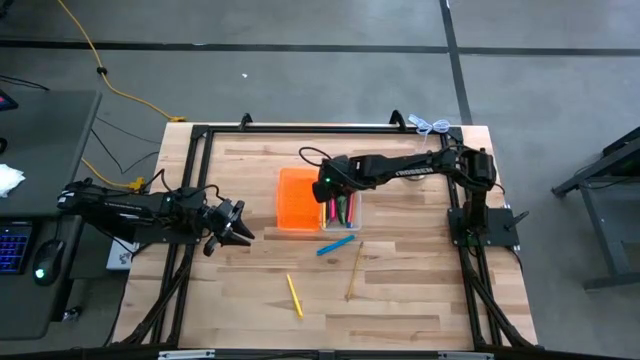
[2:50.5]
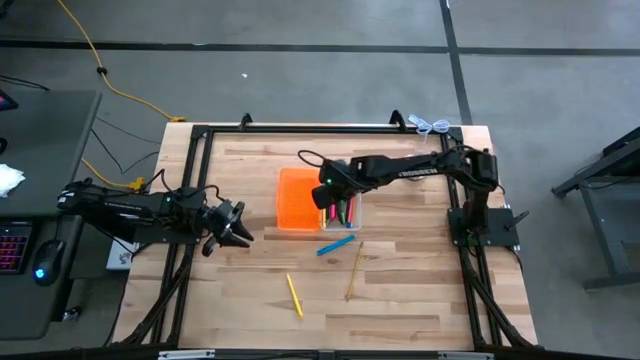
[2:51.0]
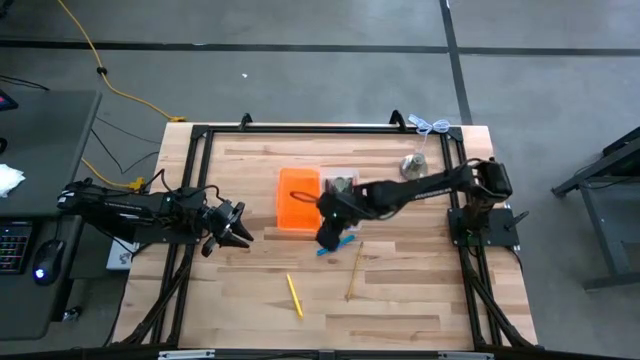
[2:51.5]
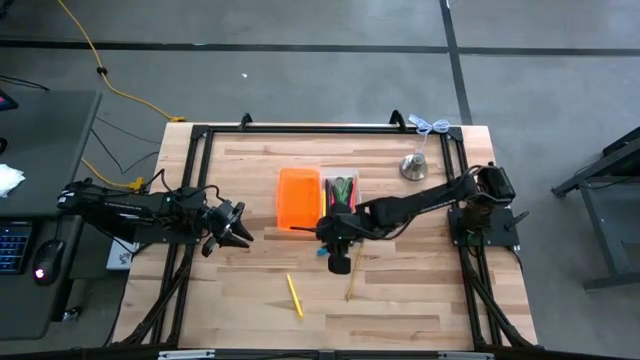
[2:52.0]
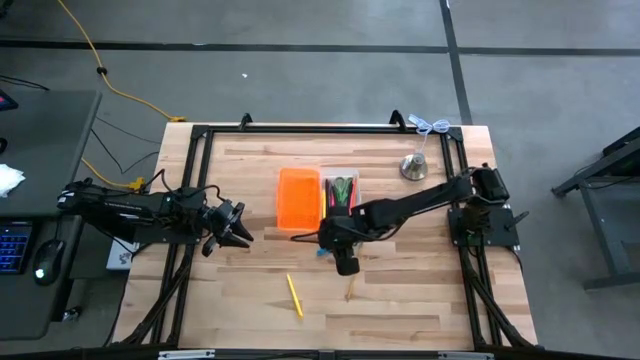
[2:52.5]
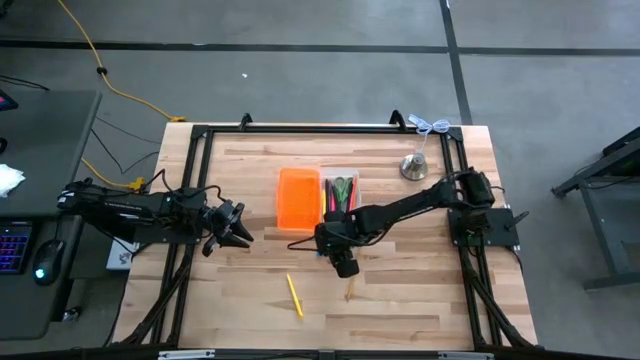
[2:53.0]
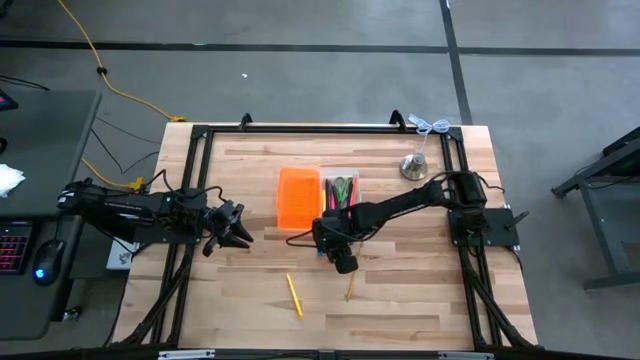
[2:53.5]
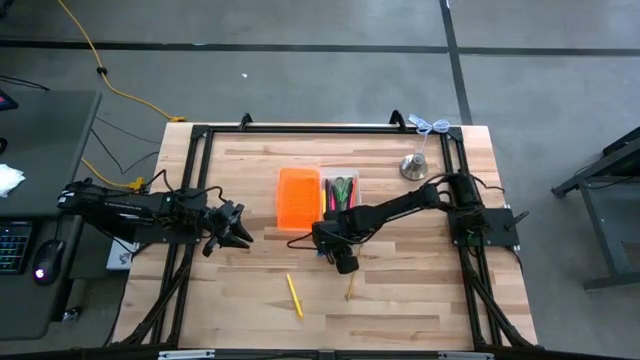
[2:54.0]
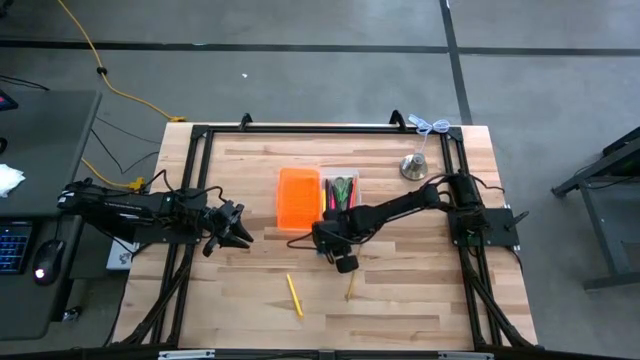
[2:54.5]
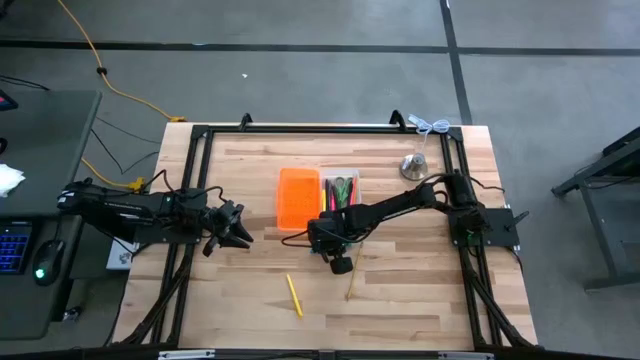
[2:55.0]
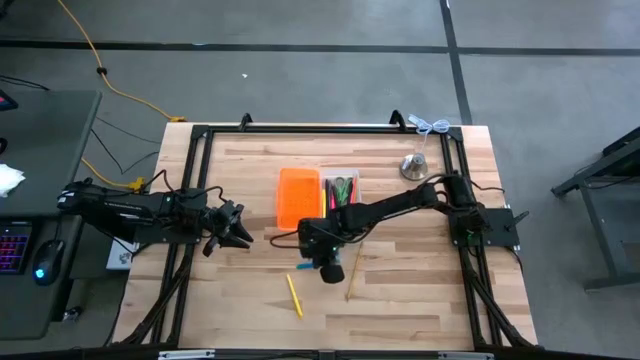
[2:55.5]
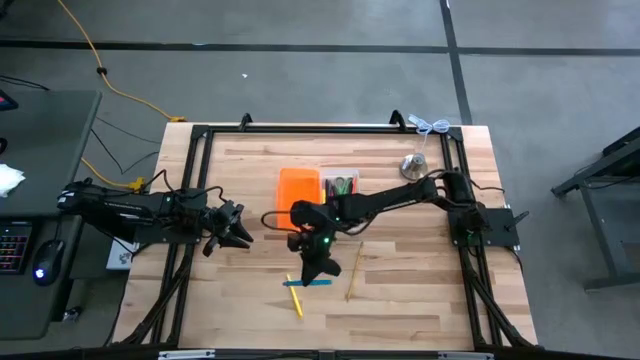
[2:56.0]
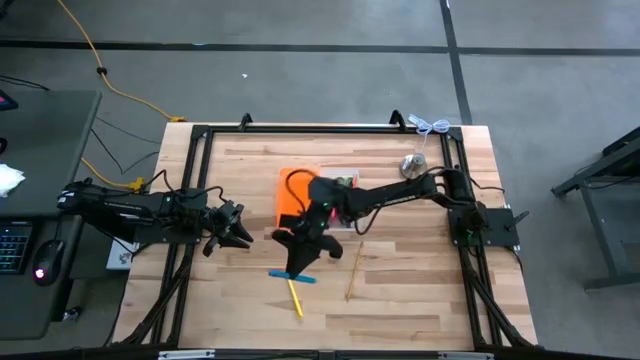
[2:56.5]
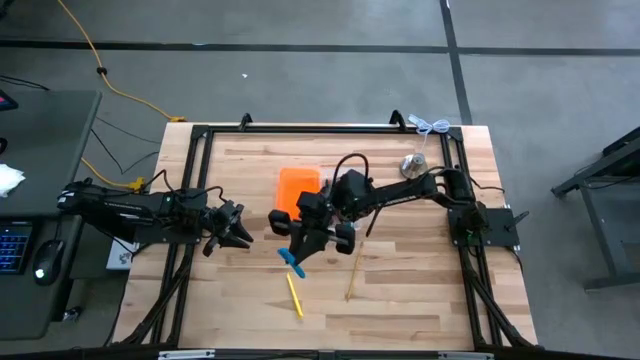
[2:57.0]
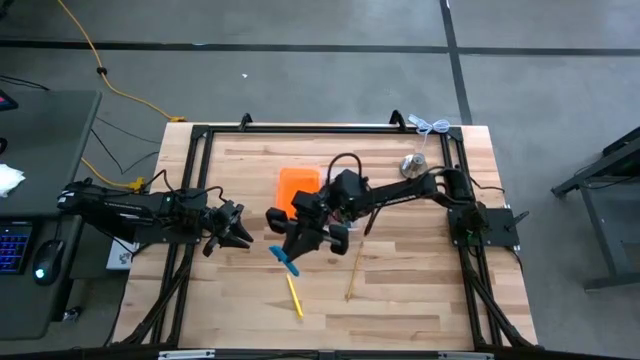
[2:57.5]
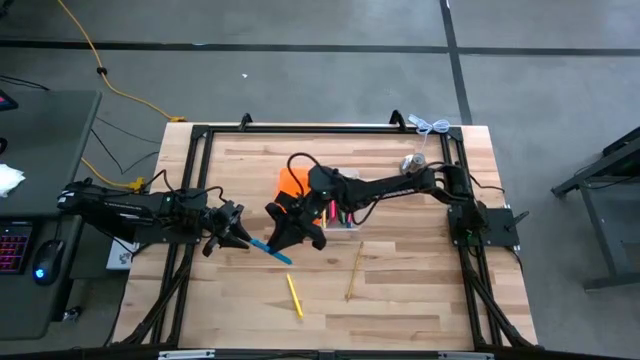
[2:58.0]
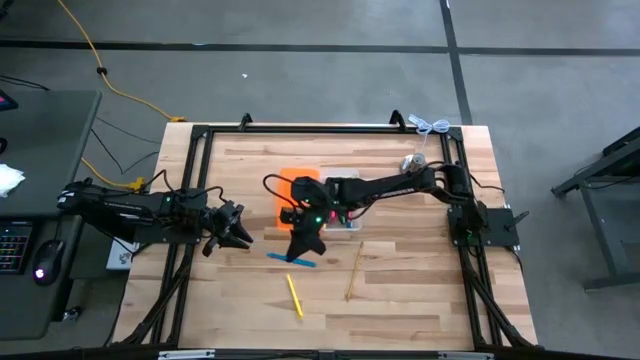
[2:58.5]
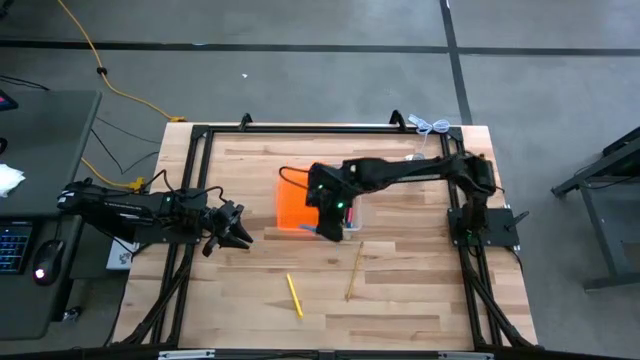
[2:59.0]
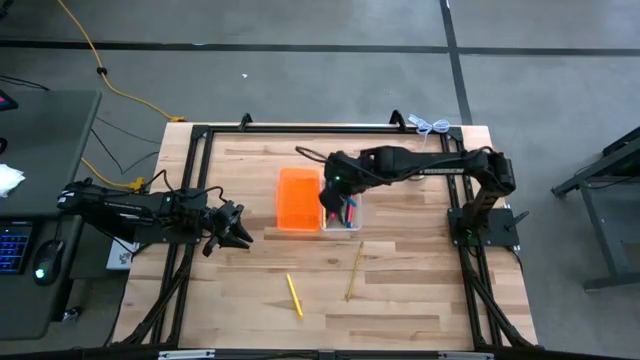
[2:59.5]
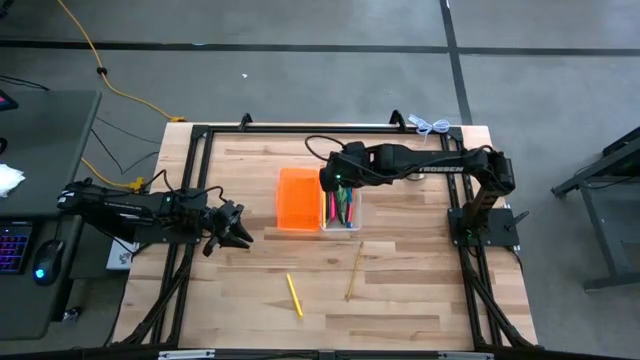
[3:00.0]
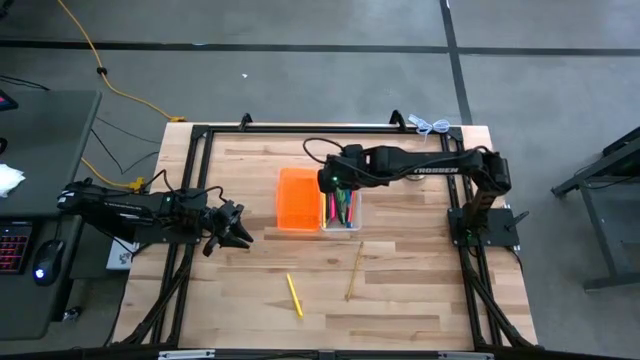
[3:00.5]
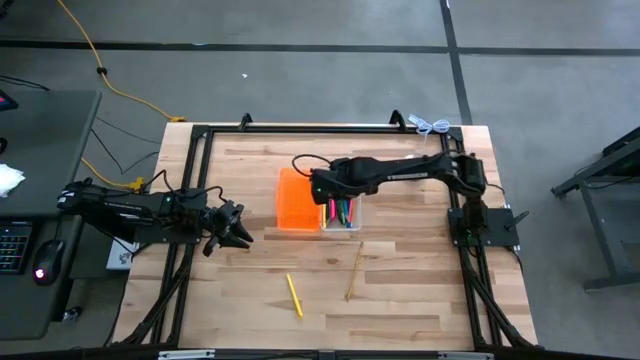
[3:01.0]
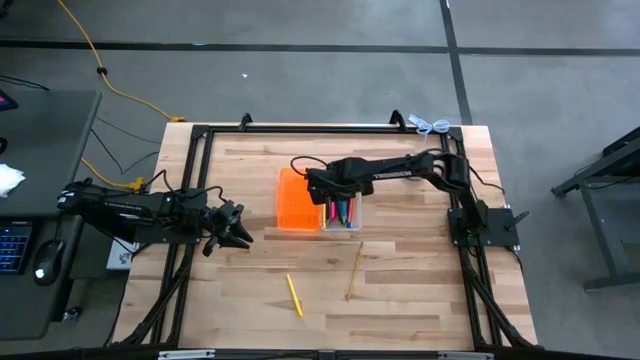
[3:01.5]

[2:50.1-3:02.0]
Task: Pick & place school supplies into a supply box
Put the blue pen into the supply box

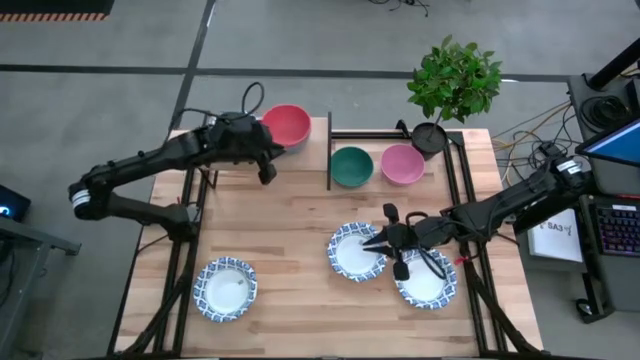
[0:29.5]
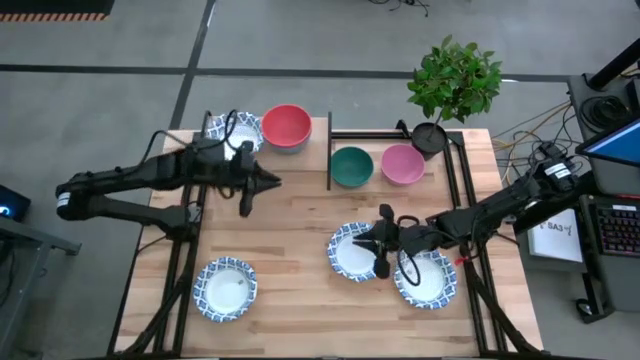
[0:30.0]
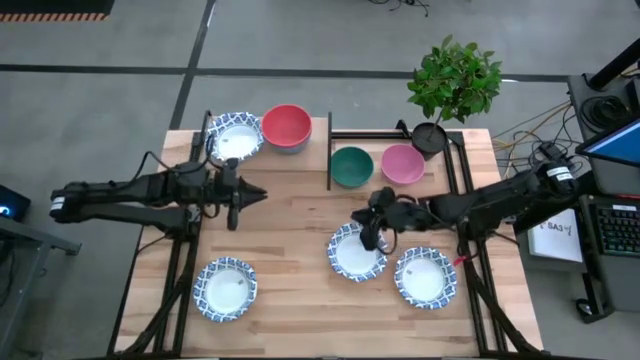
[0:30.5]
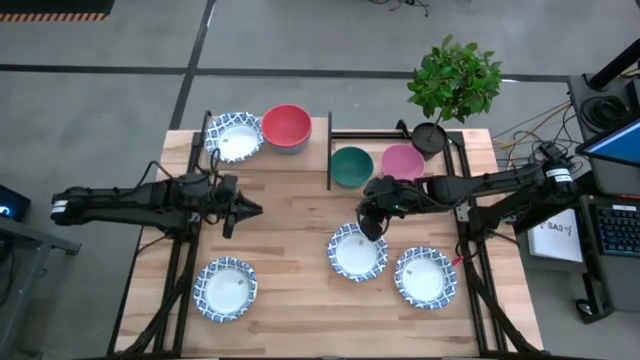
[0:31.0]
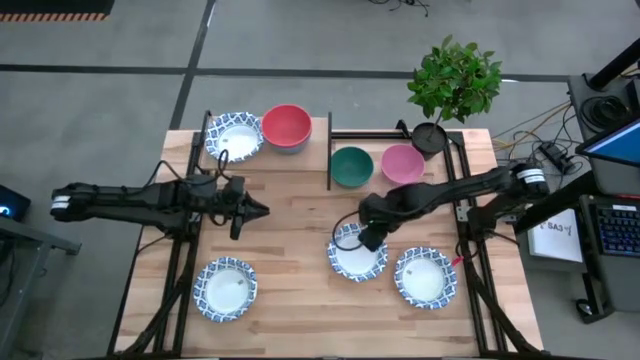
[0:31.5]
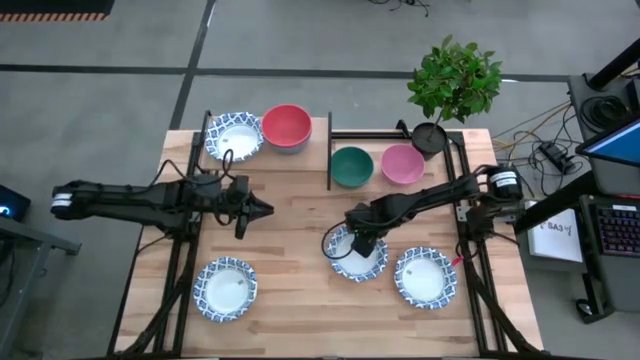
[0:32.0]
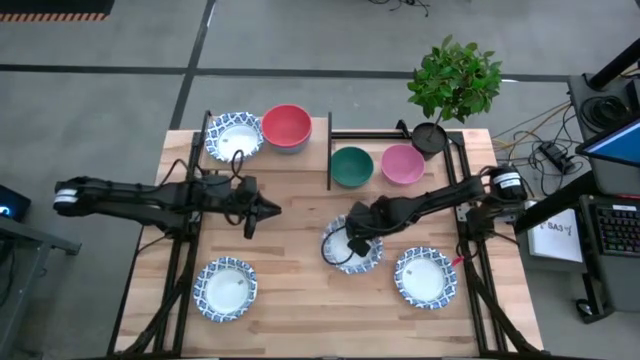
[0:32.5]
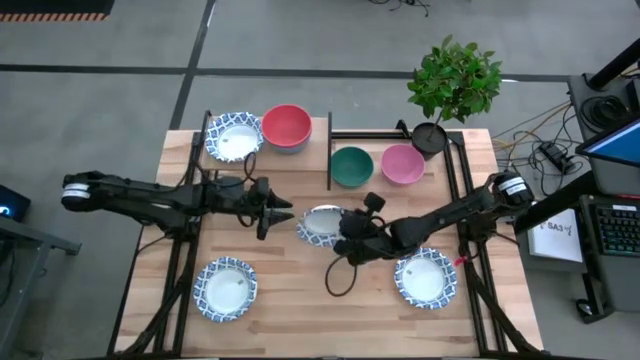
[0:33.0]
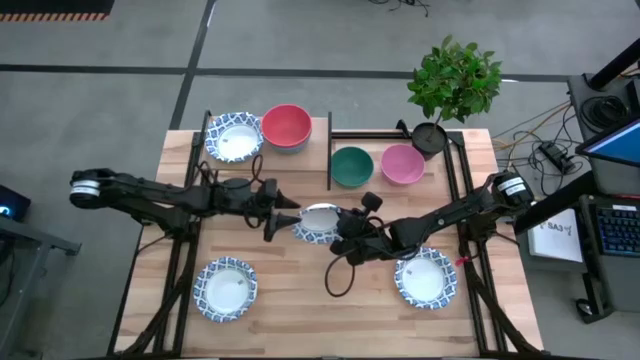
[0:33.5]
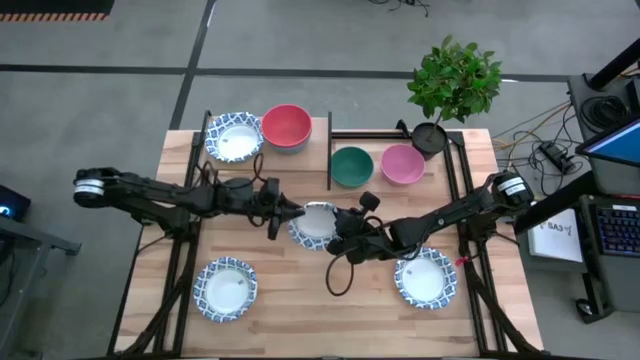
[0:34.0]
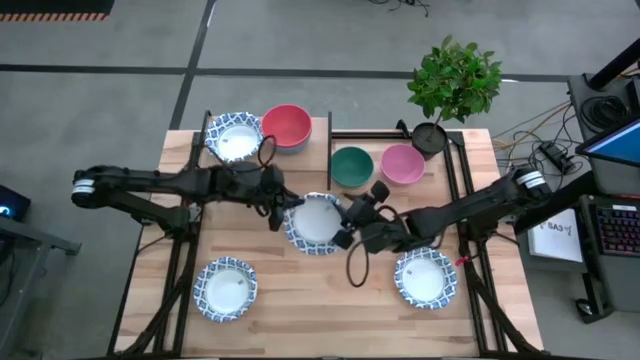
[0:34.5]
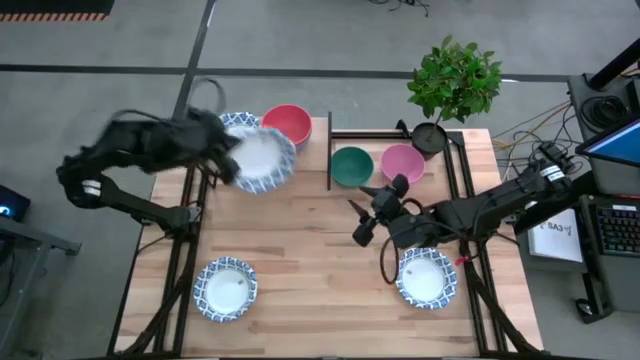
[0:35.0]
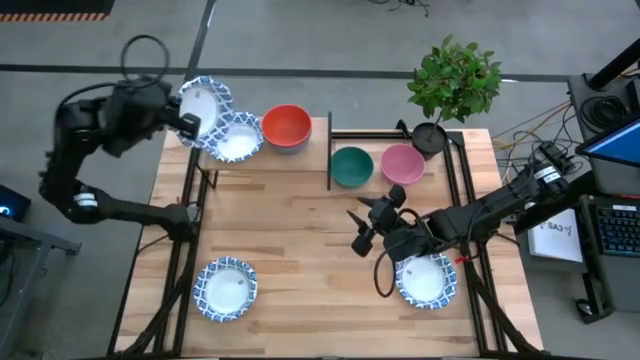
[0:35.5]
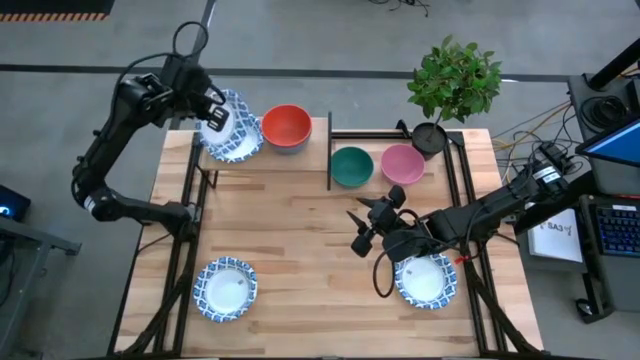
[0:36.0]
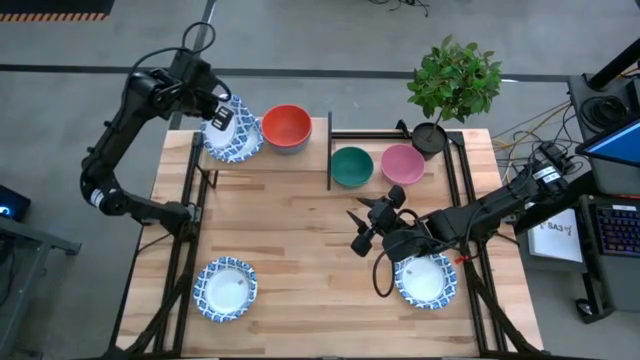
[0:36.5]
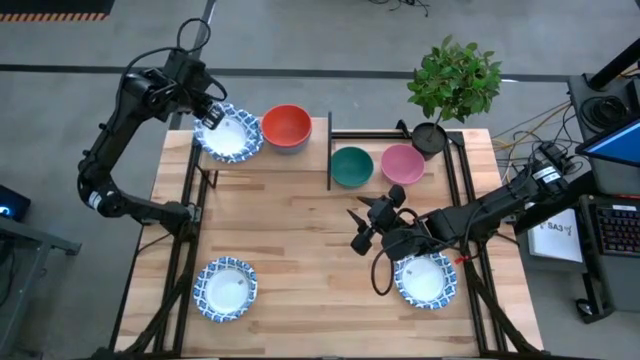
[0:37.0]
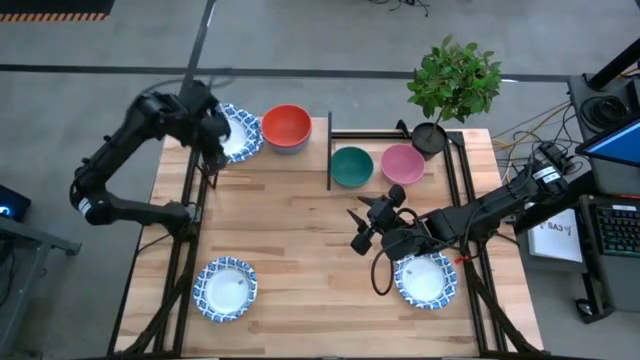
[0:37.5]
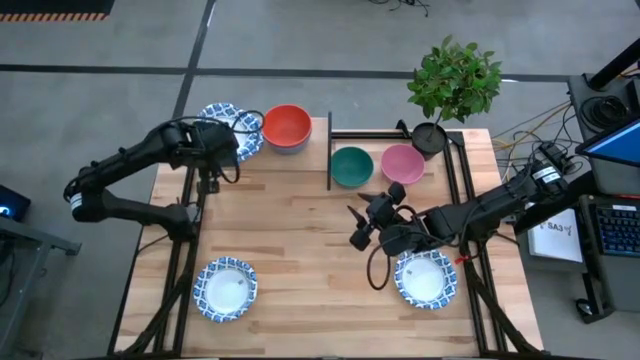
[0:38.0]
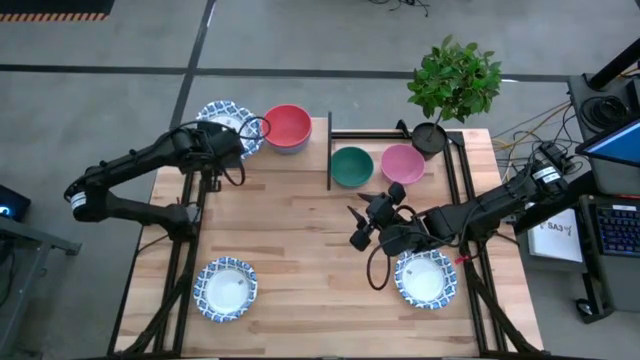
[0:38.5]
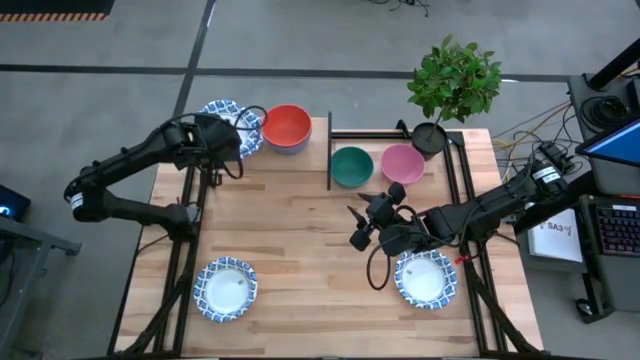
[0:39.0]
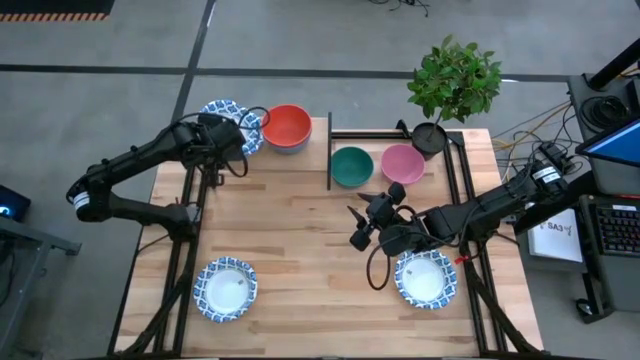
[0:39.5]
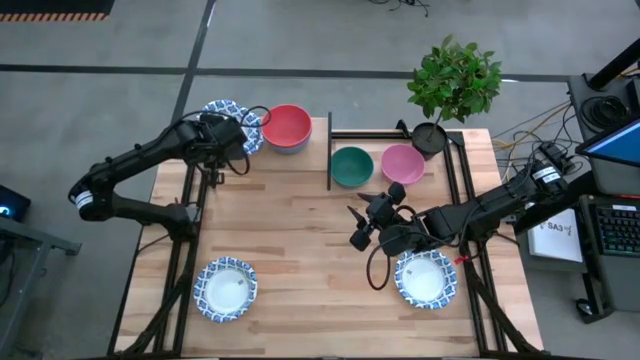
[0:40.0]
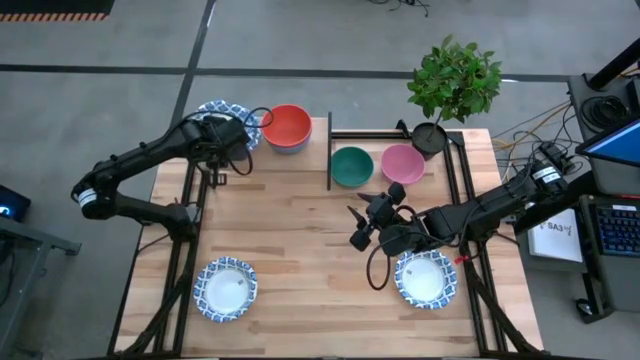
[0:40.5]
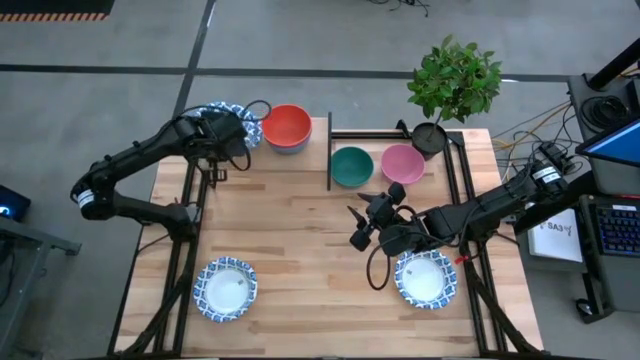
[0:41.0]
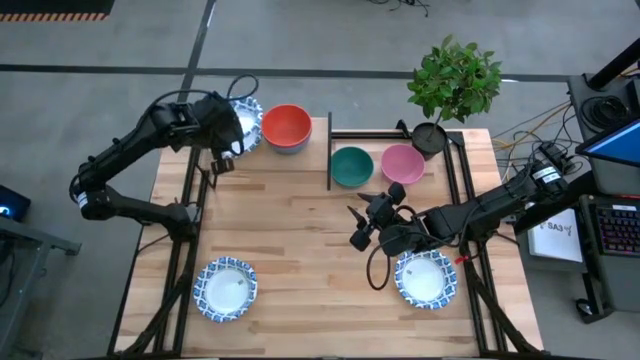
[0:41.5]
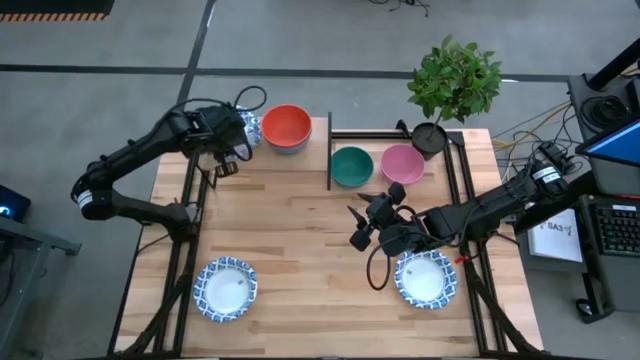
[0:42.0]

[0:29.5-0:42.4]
Task: Place and stack bowls onto a shelf
Stack the top right white and blue bowl on top of the white and blue bowl
